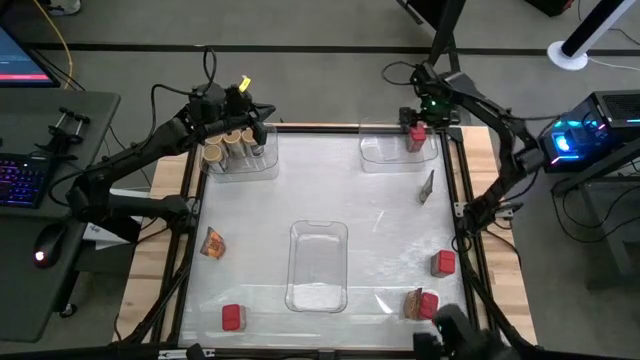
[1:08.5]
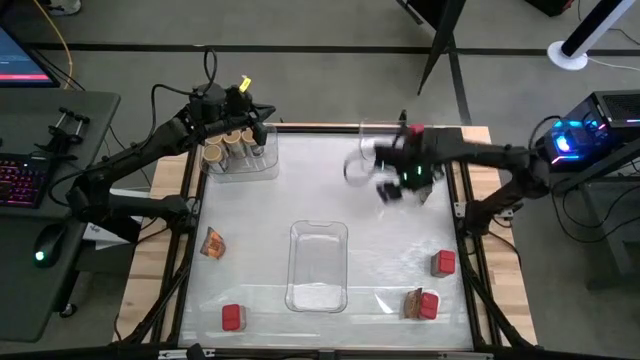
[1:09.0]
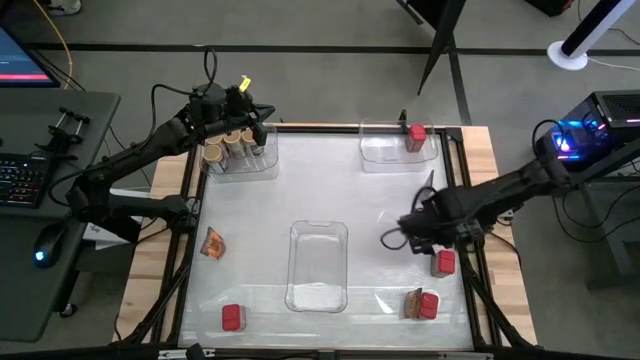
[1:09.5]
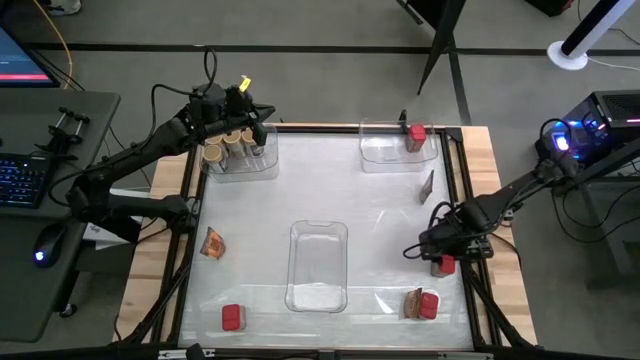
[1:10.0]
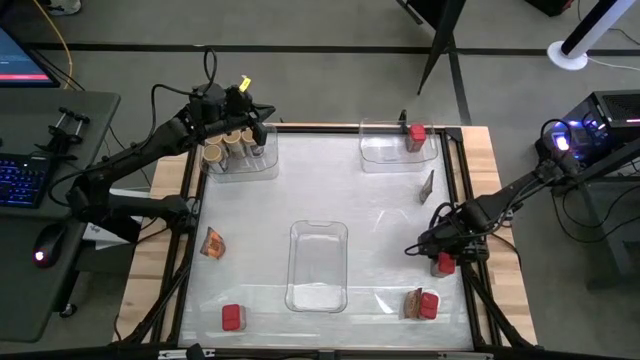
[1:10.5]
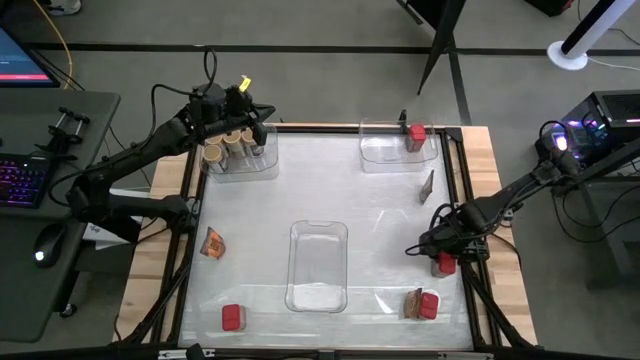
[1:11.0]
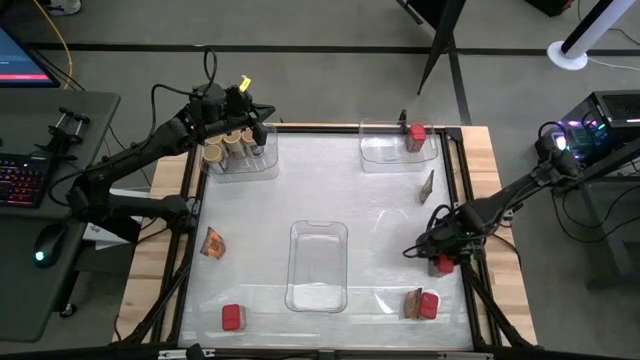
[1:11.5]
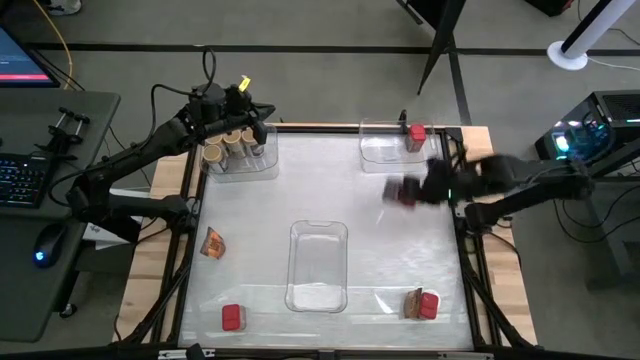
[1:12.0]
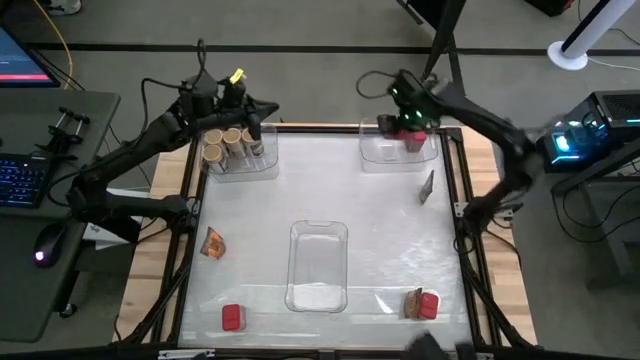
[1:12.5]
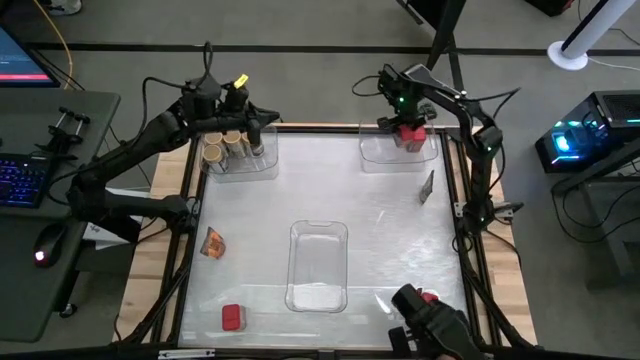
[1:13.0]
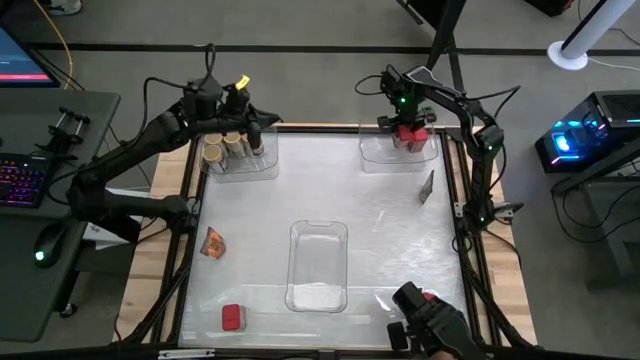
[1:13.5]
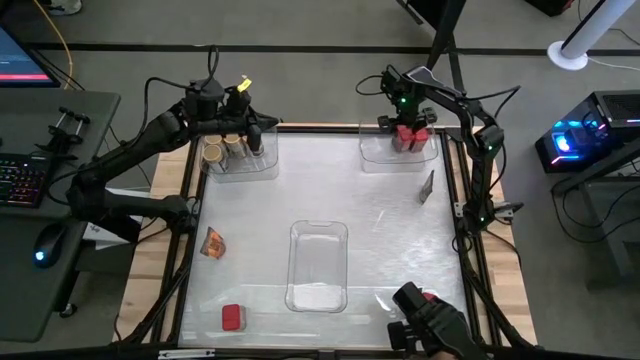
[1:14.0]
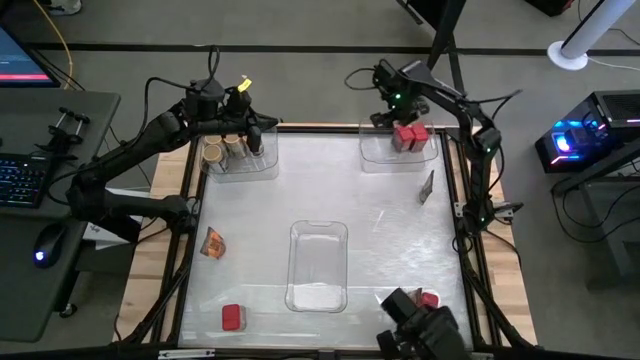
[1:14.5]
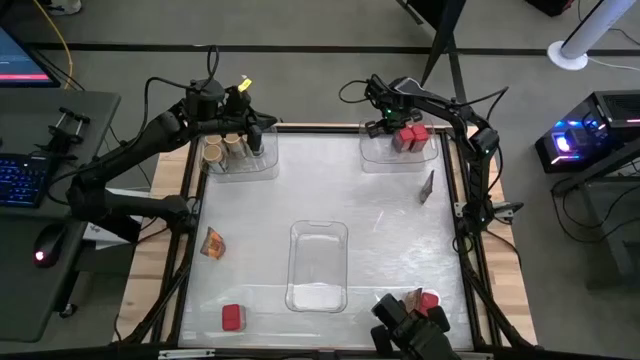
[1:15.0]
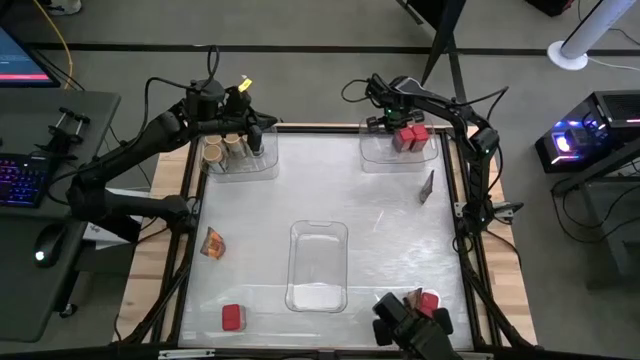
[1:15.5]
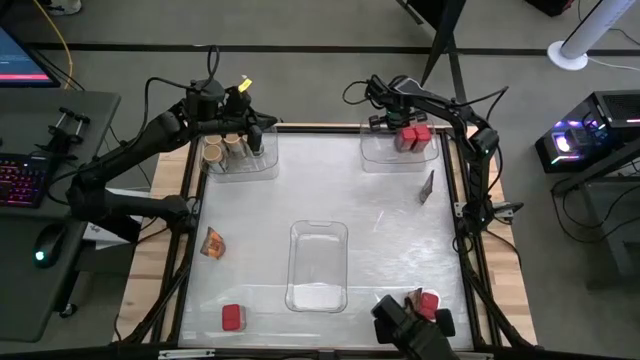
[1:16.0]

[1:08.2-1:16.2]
Task: Sort spices by type
Put the top red seasoning can into the top right transparent bin

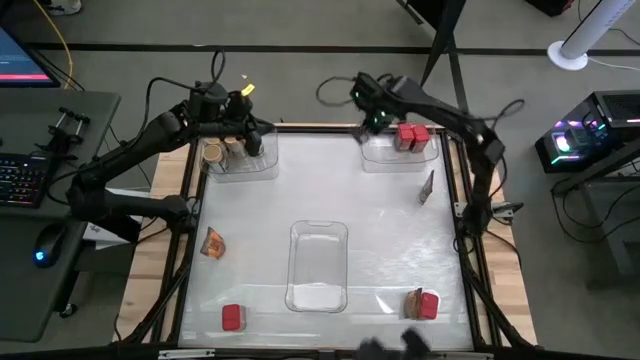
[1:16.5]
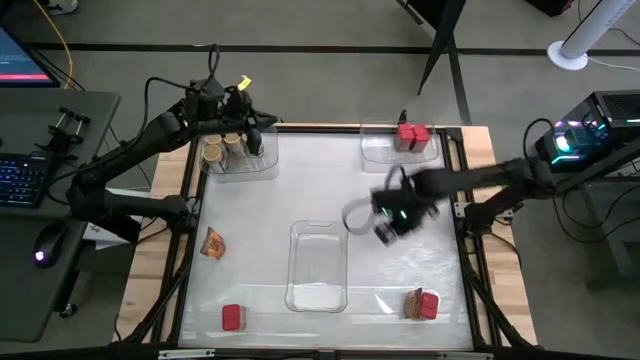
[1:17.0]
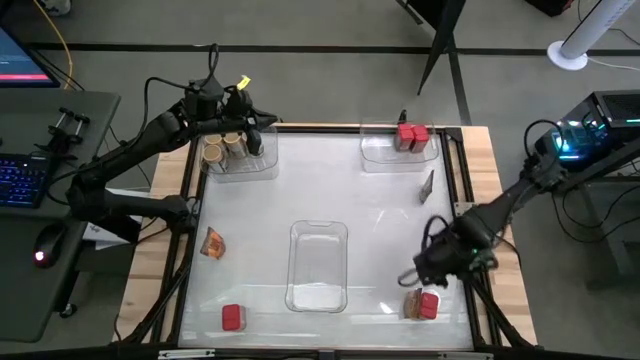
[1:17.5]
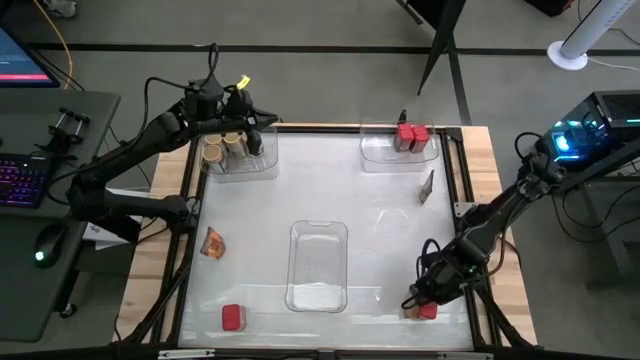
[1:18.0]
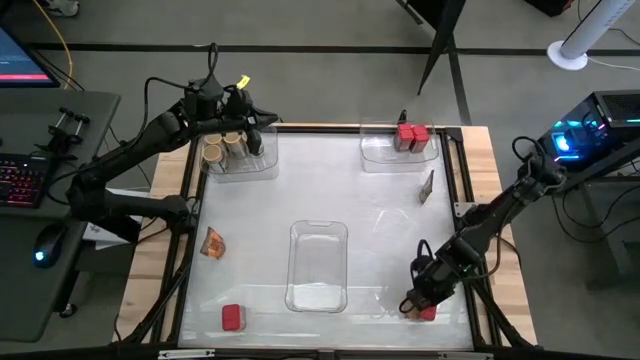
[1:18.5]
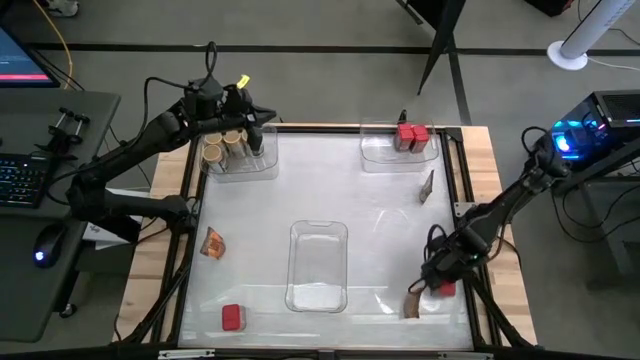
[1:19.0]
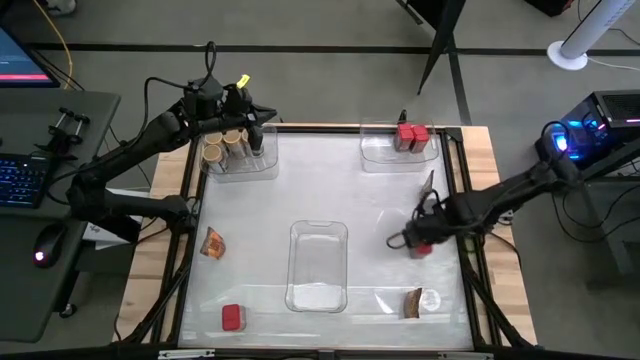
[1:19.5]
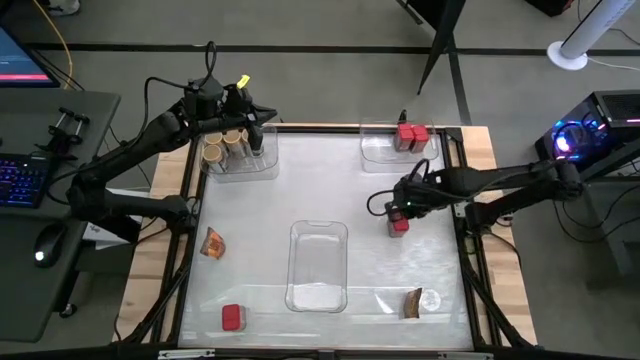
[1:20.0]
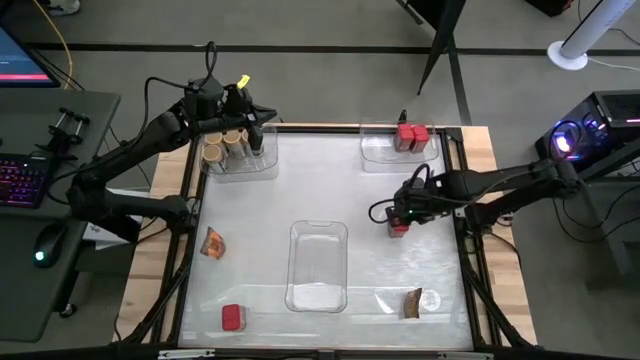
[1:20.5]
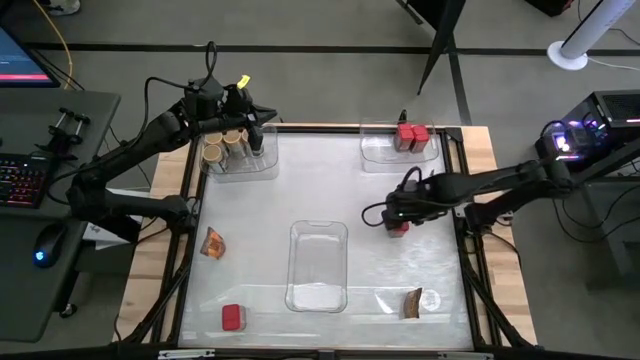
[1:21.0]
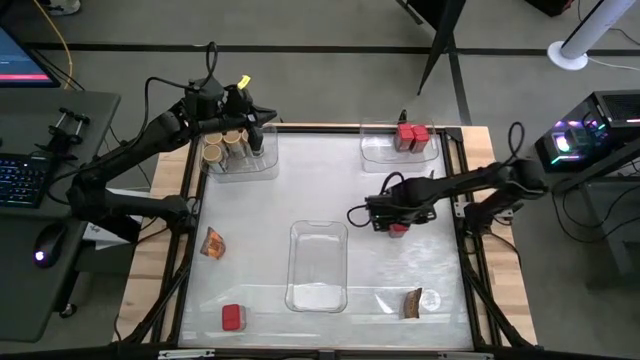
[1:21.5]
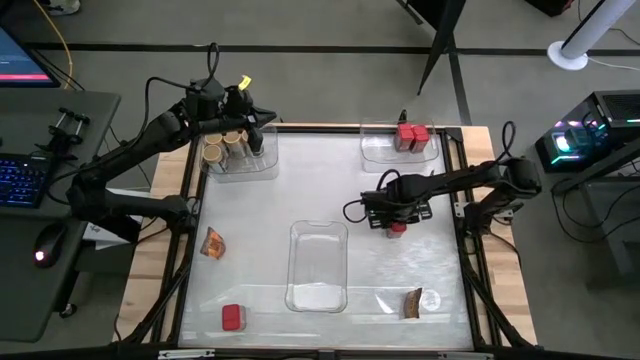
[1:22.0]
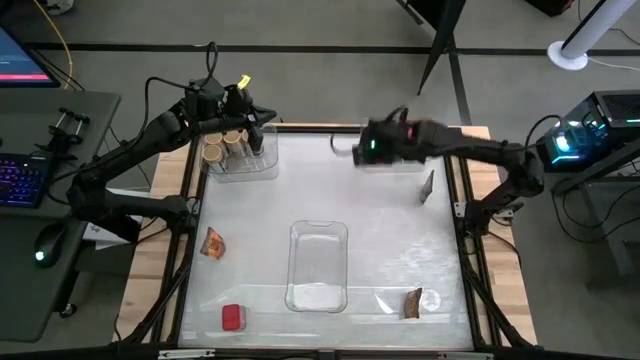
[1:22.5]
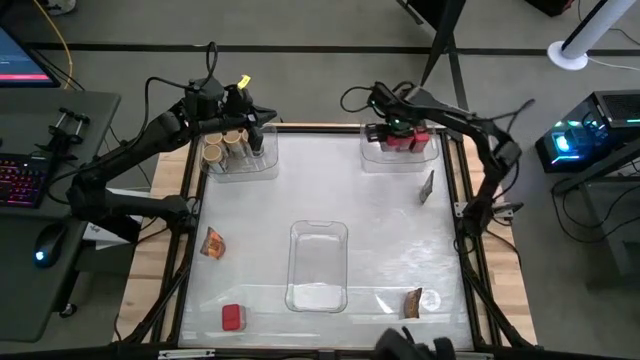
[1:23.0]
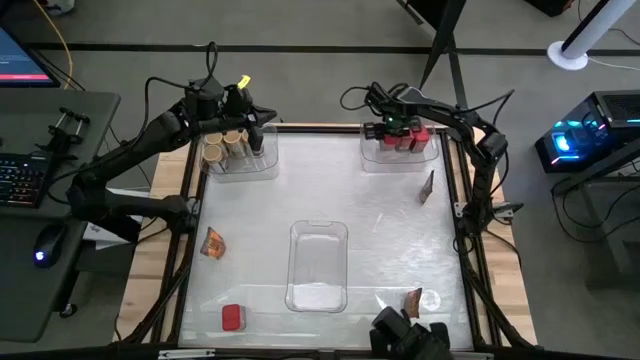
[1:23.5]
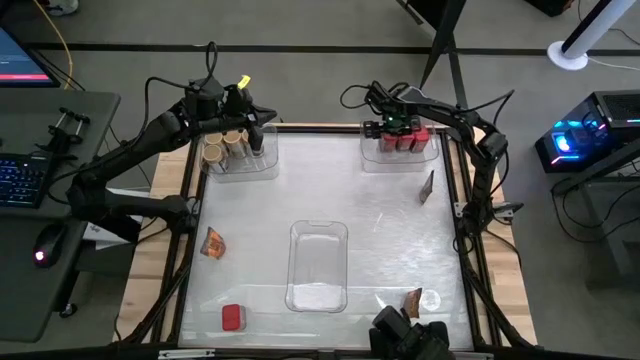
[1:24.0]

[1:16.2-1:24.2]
Put the right red seasoning can into the top right transparent bin

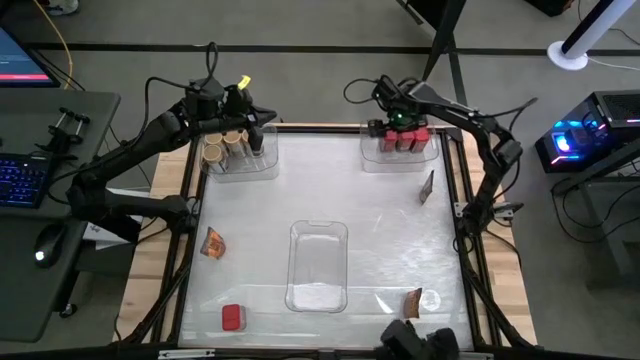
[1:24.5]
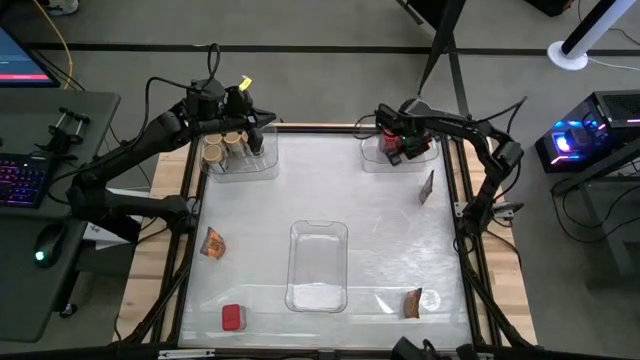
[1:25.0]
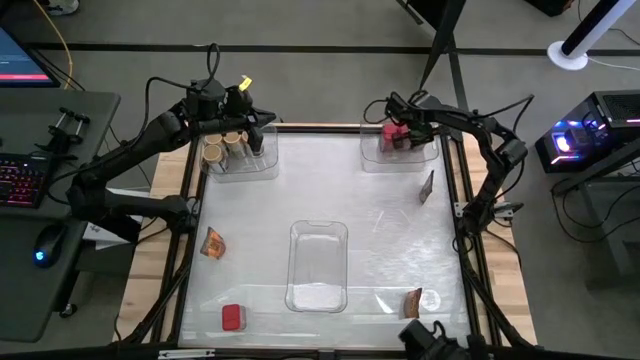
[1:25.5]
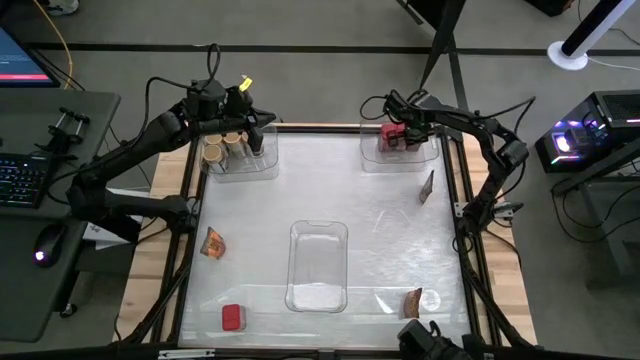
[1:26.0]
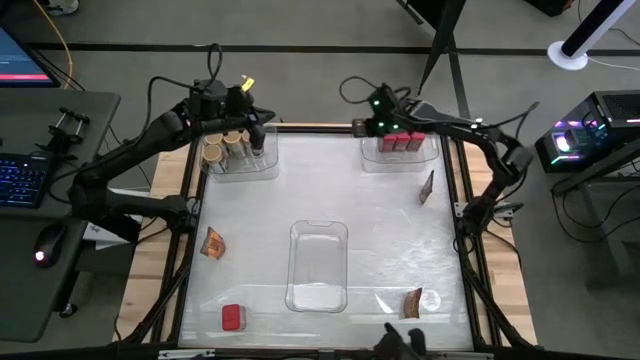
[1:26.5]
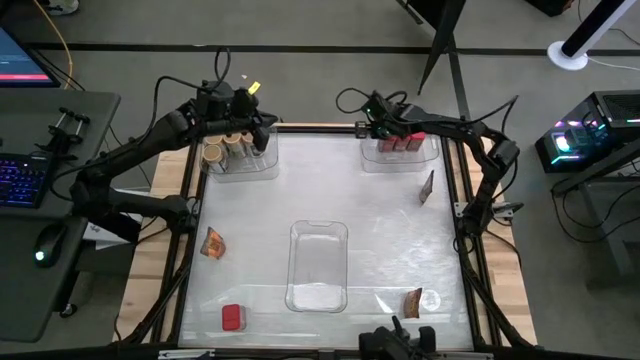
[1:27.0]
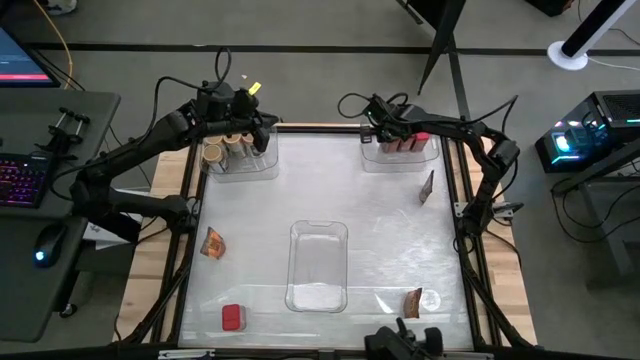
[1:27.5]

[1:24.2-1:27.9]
Adjust the red seasoning cans
